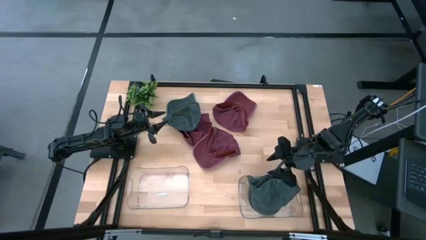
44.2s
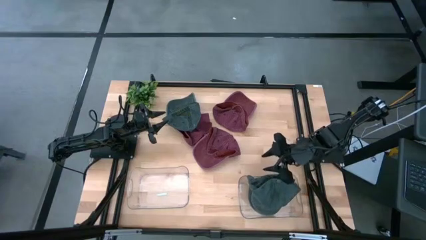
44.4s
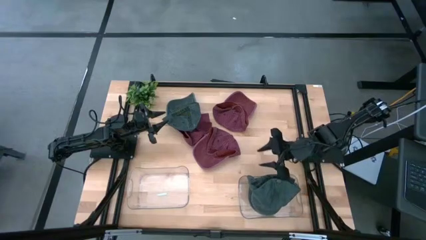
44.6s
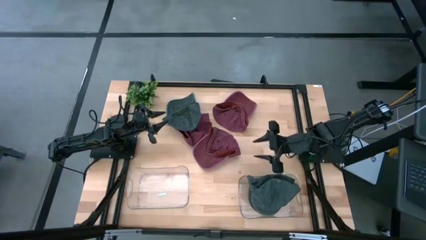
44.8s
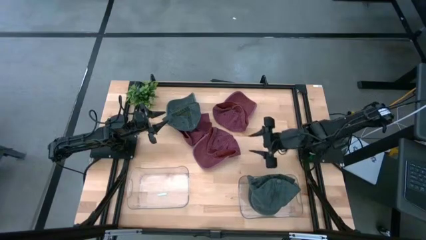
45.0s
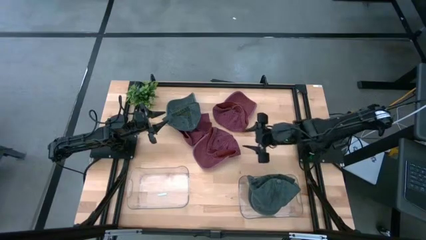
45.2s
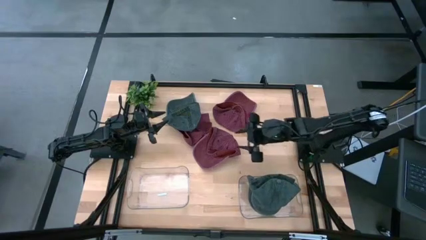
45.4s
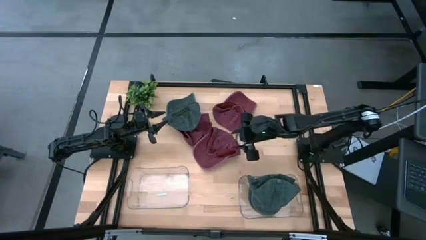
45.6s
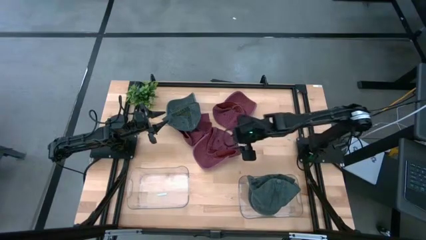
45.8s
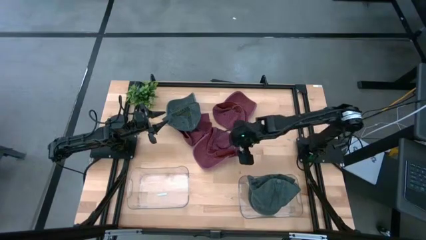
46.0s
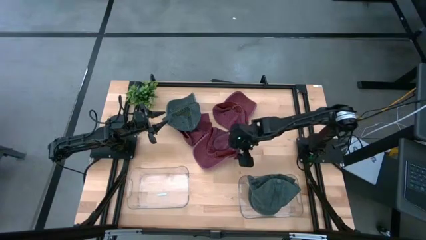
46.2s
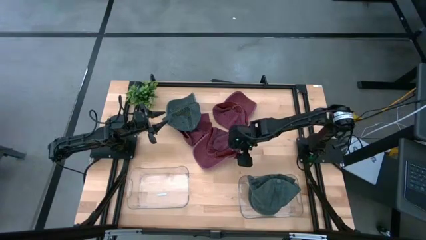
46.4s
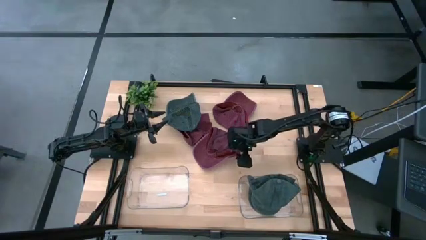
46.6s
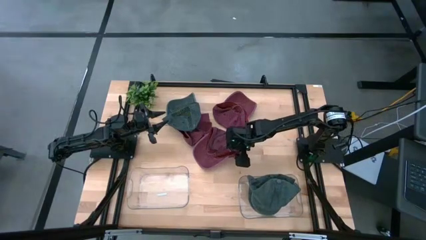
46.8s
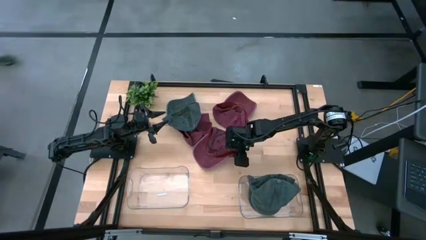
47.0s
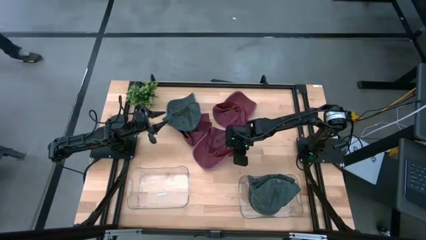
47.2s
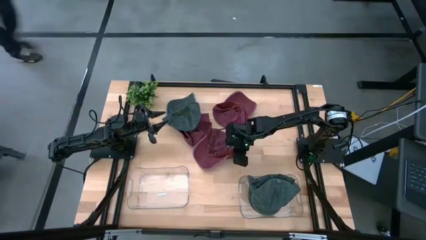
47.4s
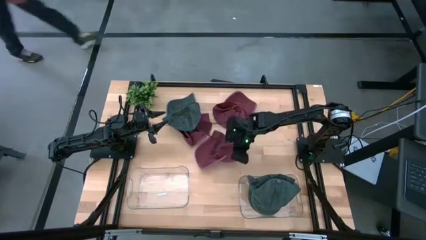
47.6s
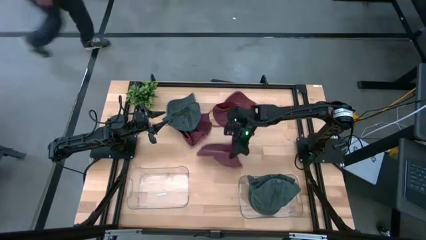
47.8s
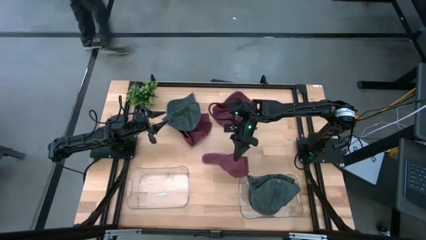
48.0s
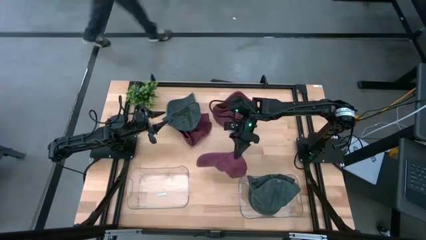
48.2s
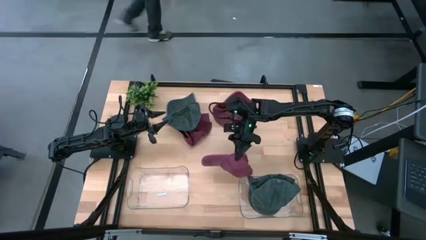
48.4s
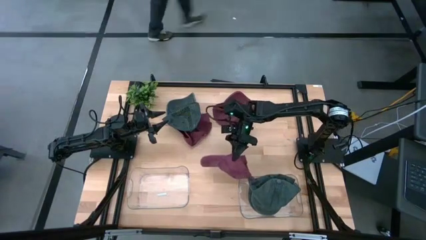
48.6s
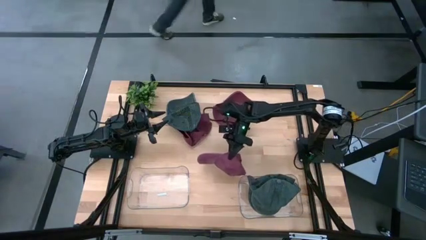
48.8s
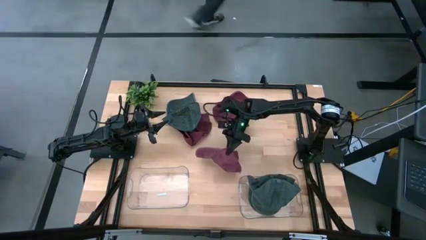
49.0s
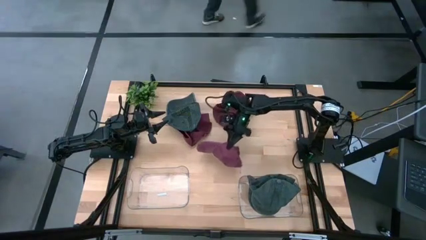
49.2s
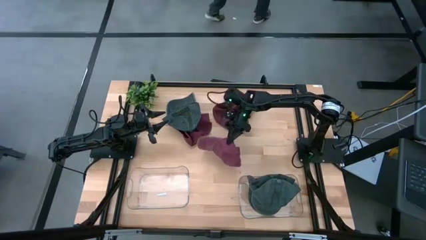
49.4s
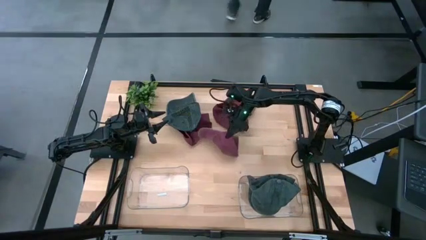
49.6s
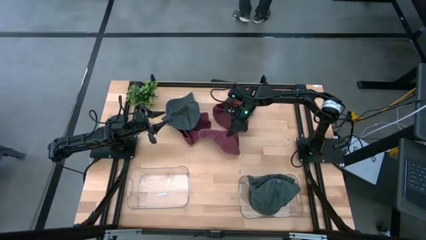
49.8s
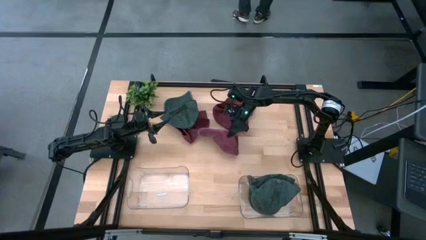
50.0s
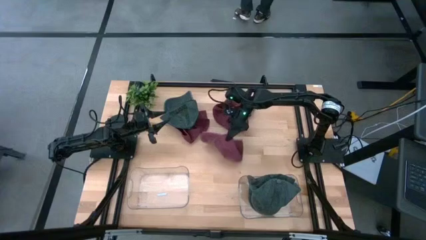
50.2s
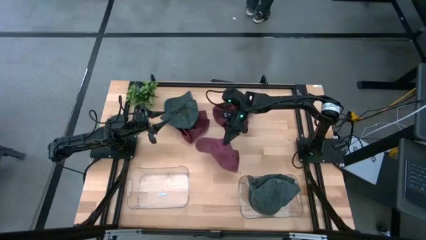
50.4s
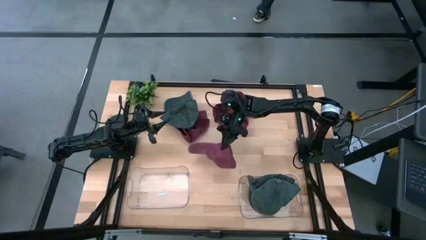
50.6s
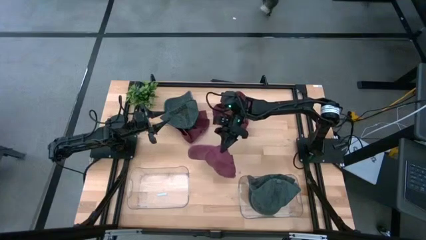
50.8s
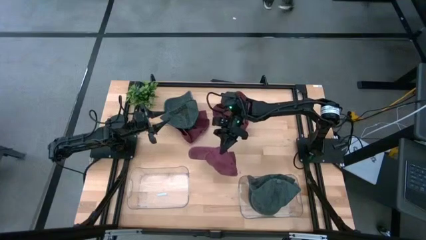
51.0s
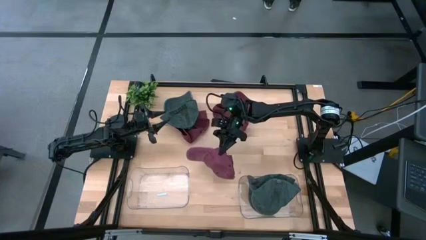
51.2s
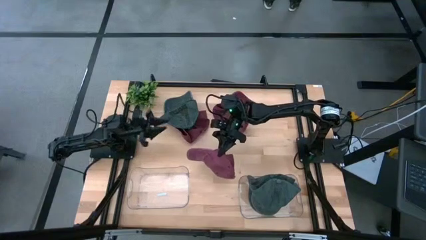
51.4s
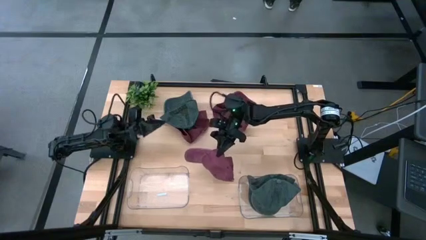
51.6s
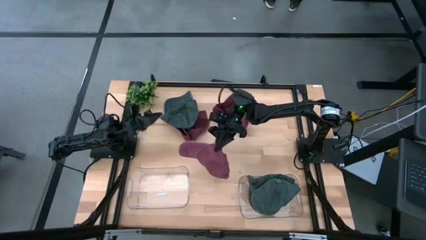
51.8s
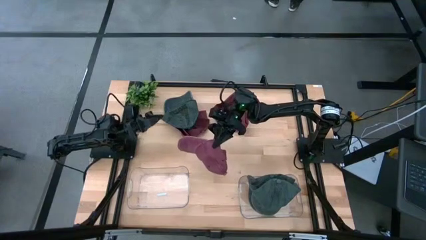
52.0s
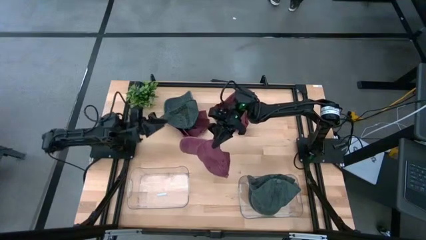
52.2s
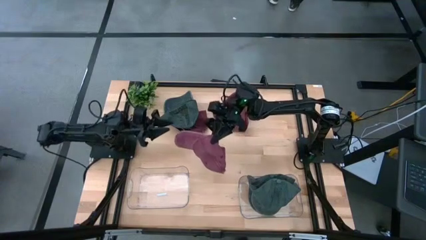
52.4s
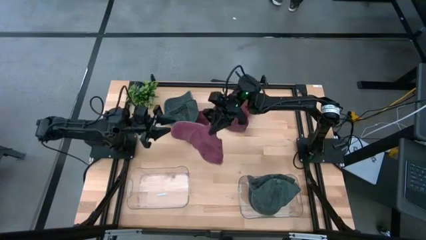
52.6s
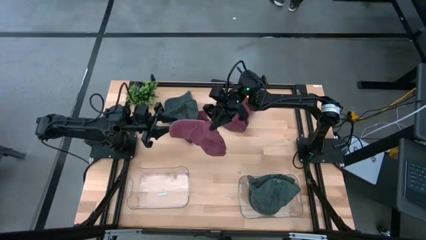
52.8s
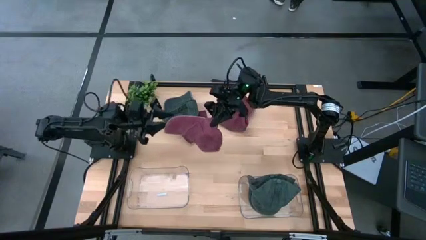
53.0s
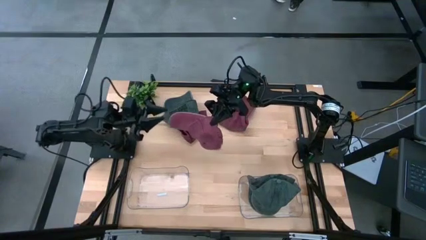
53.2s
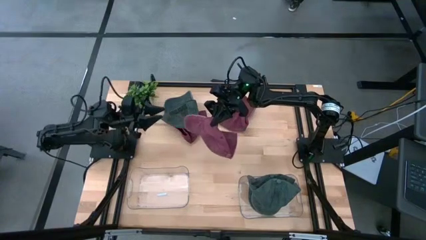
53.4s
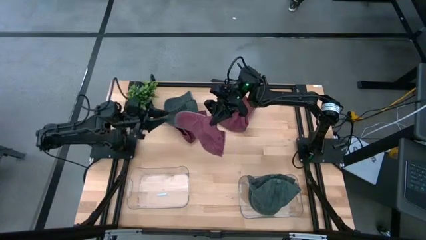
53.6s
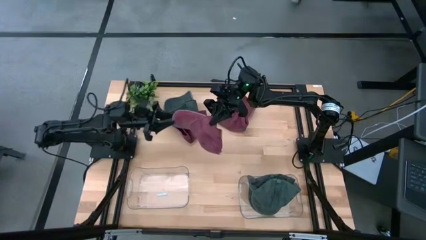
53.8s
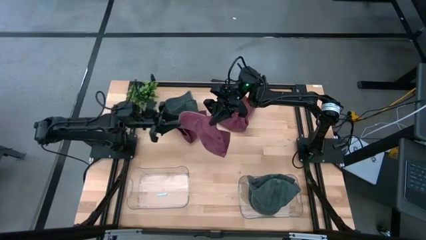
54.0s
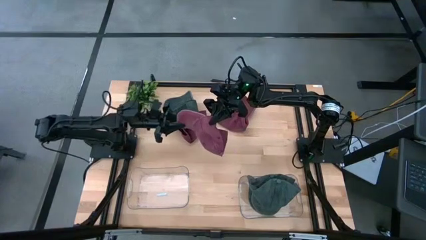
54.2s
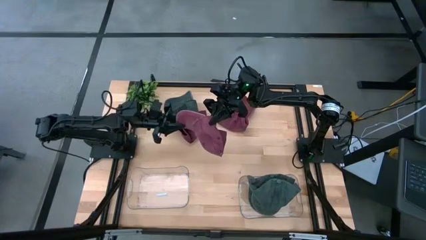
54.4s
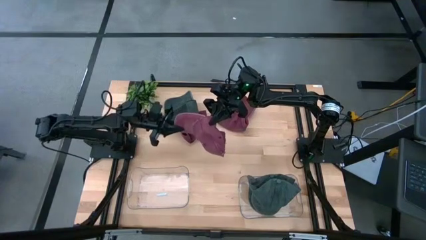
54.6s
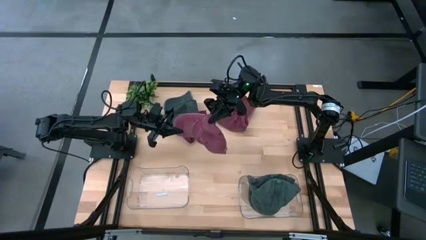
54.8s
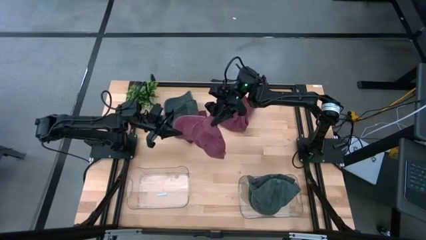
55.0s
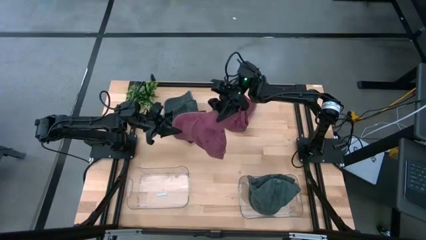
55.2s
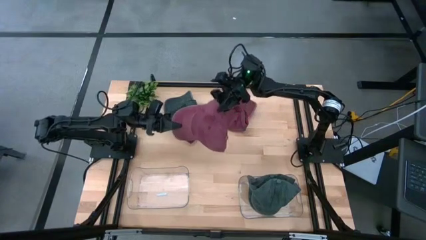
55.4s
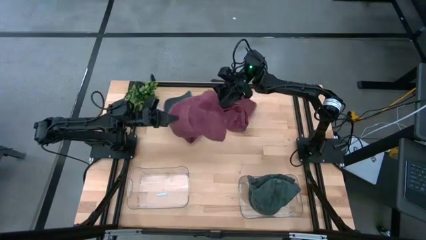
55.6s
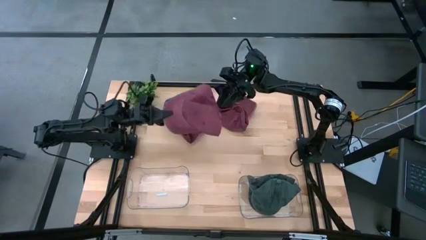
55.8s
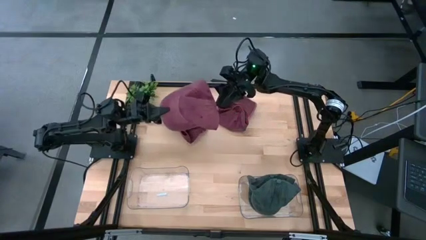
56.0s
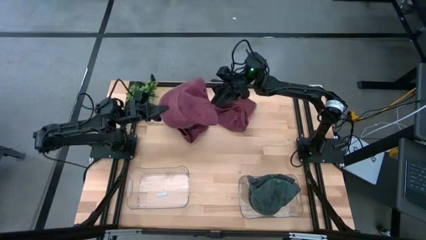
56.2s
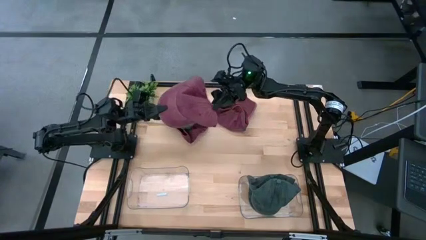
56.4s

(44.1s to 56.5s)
Task: Pick & Place hat
Put the bottom red cap into the left transparent bin

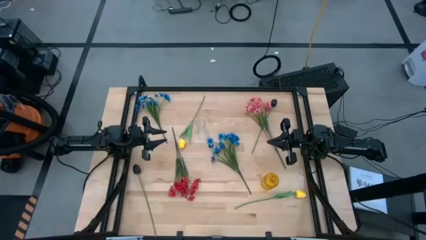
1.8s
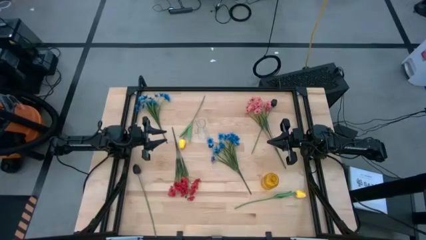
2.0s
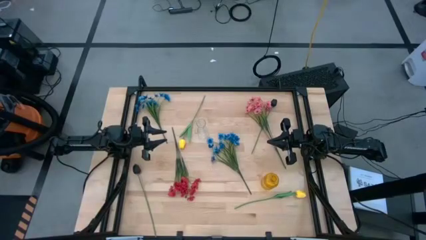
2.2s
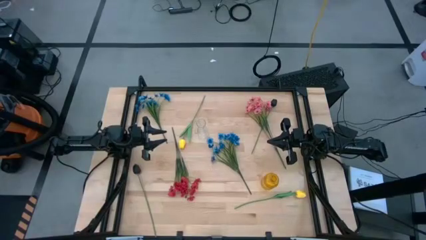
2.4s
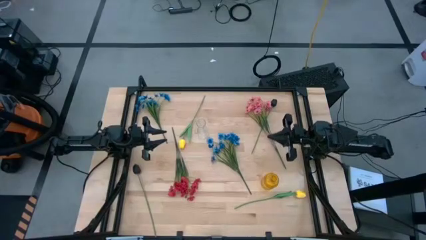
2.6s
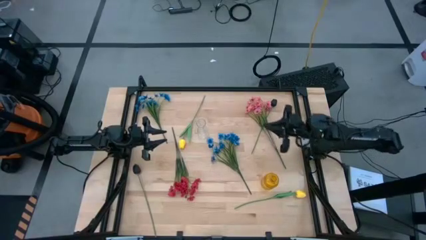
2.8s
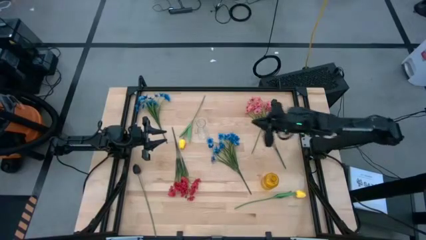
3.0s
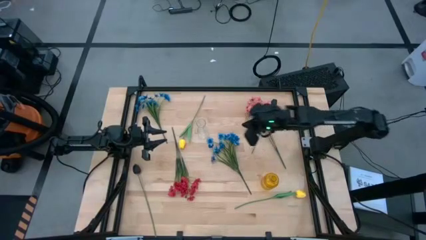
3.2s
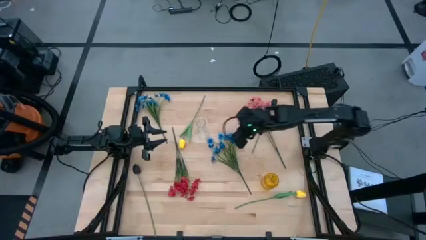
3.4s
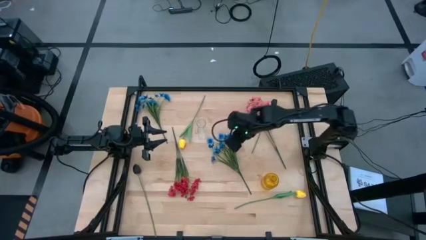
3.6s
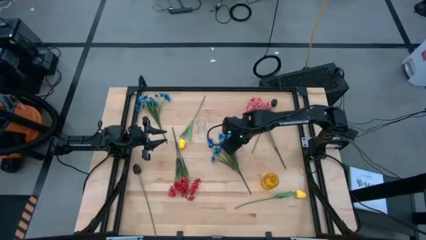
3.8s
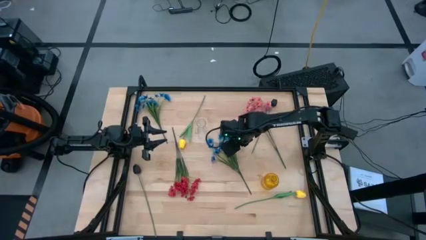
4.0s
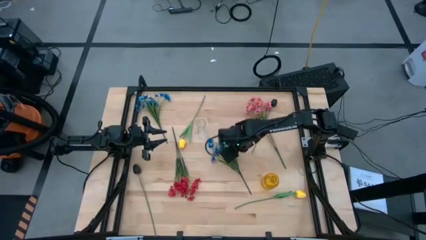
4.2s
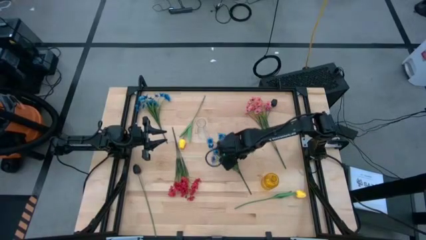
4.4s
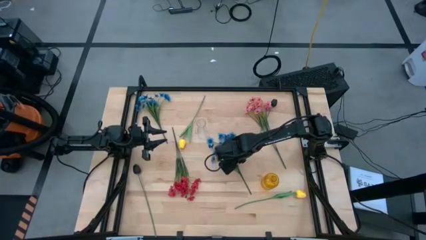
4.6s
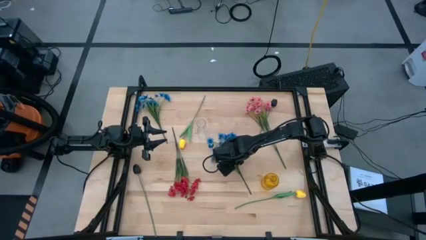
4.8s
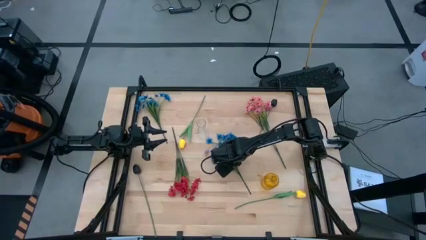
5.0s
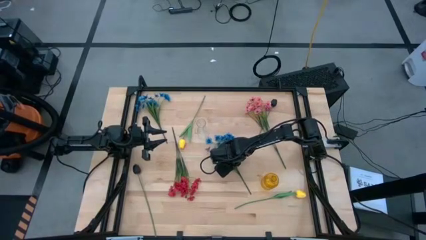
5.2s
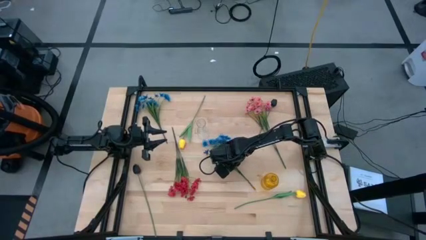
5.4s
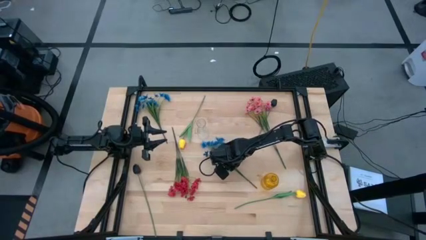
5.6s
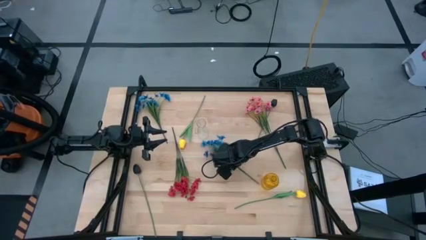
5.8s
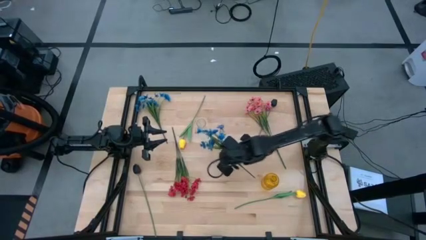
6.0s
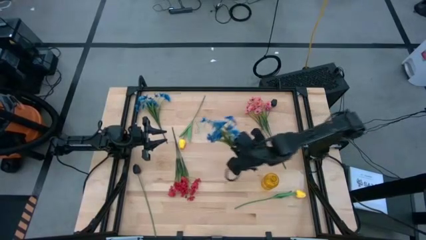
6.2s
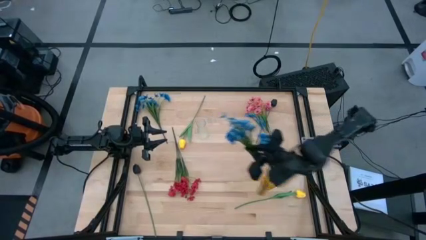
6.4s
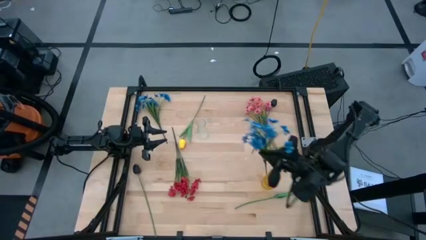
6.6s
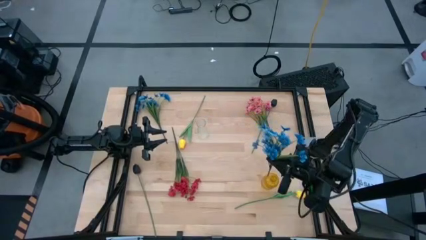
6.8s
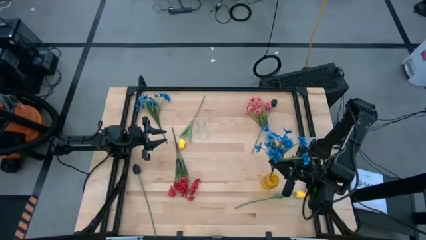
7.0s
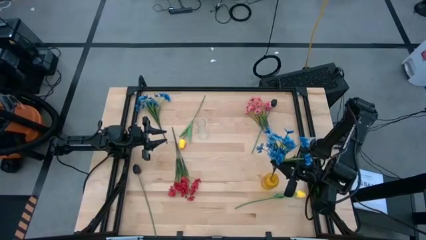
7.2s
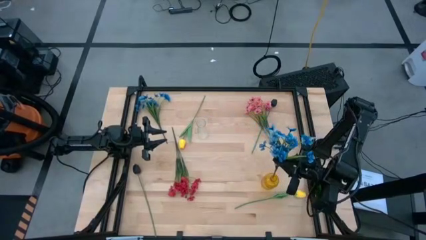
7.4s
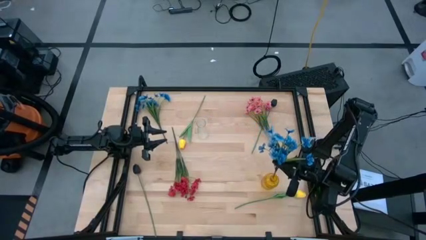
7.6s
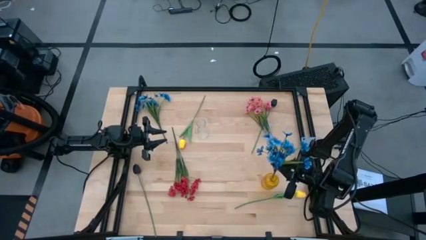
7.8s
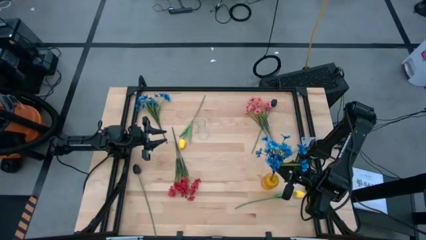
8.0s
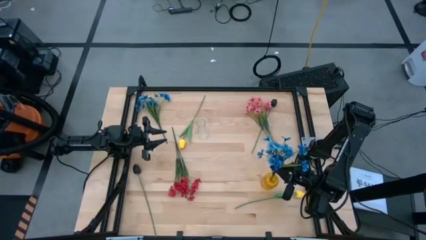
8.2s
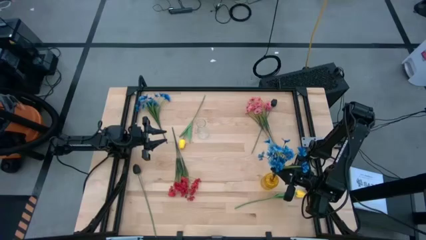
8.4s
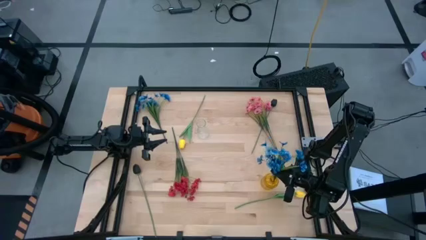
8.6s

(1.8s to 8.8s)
Task: Sort flowers into vase by color
Put the right blue flowers into the yellow vase
